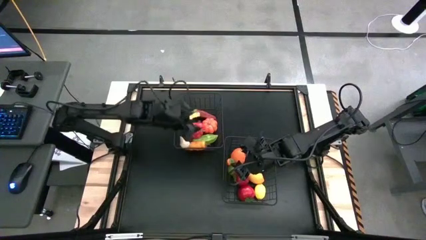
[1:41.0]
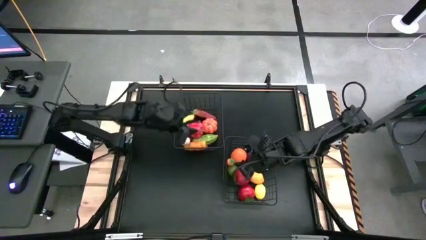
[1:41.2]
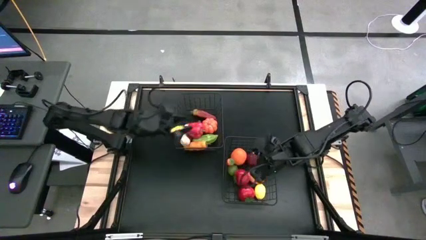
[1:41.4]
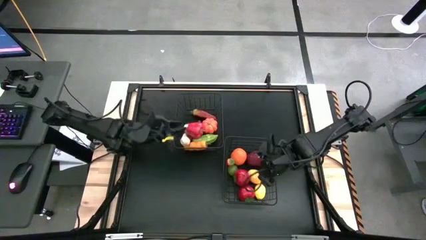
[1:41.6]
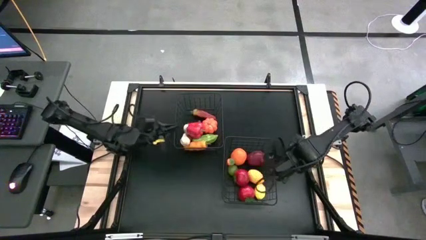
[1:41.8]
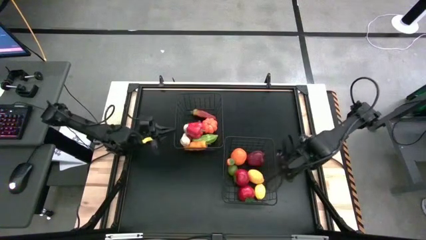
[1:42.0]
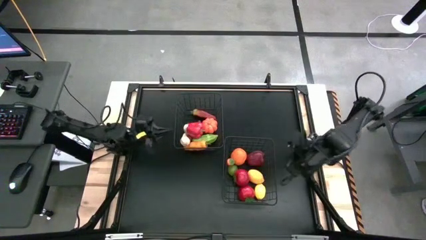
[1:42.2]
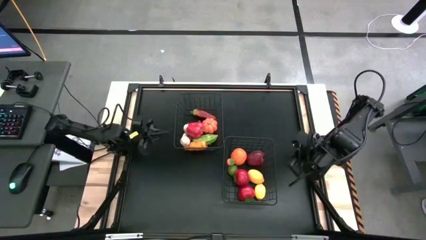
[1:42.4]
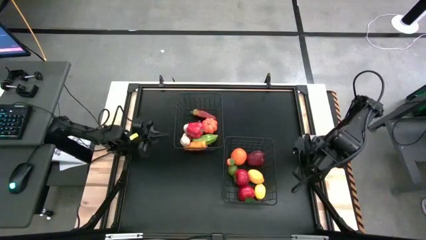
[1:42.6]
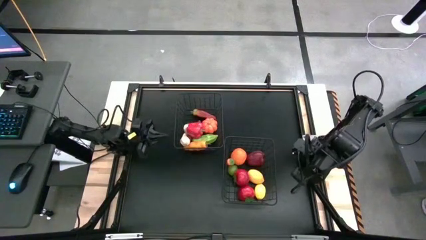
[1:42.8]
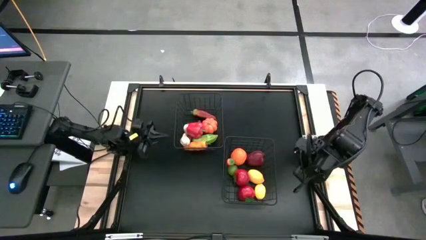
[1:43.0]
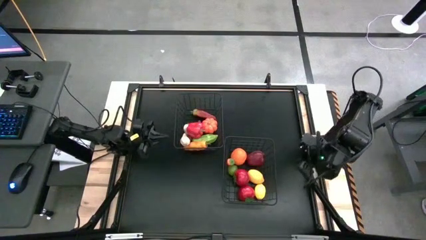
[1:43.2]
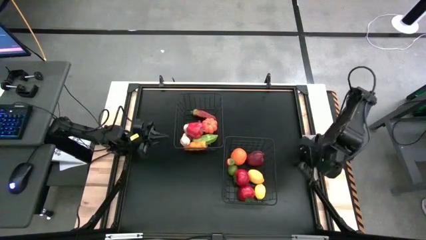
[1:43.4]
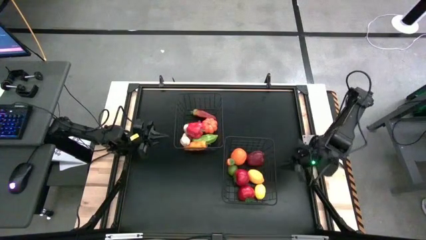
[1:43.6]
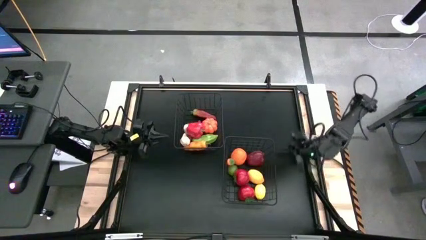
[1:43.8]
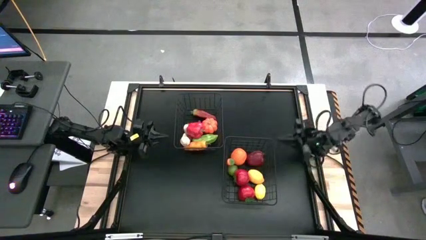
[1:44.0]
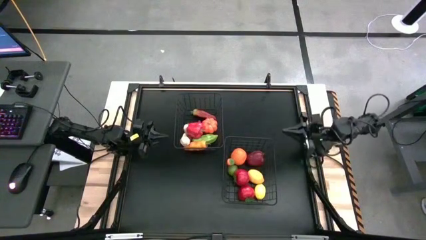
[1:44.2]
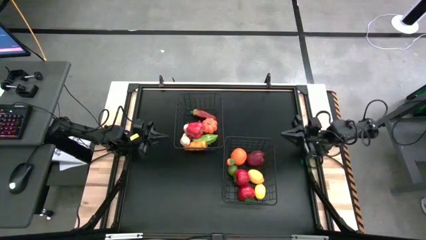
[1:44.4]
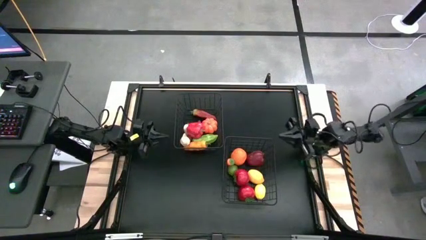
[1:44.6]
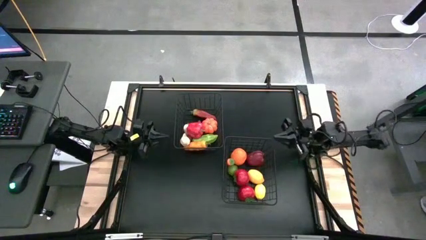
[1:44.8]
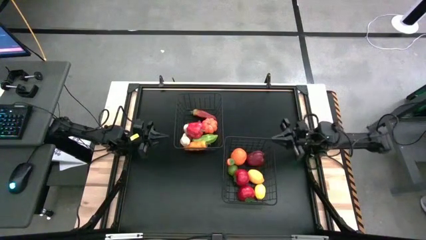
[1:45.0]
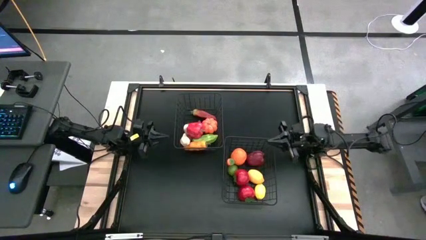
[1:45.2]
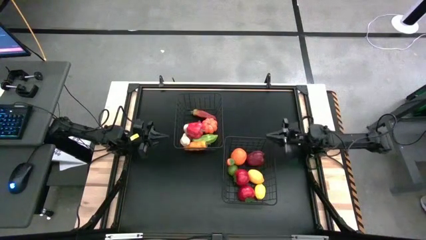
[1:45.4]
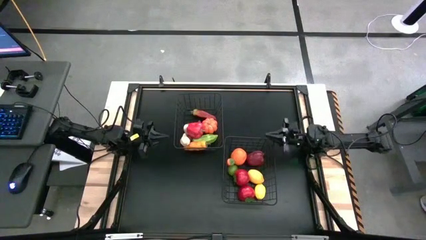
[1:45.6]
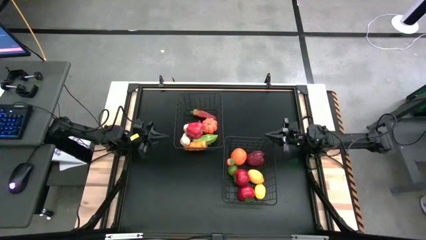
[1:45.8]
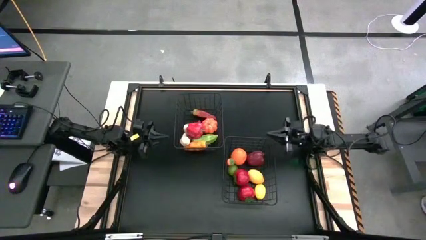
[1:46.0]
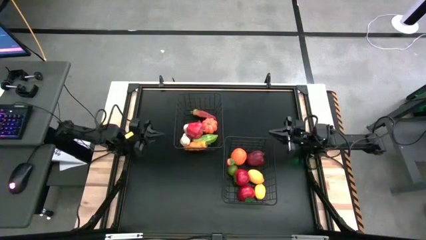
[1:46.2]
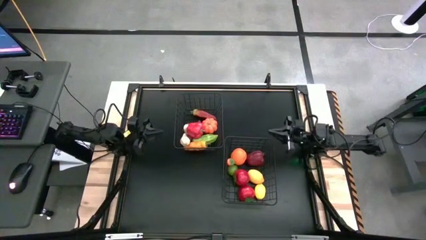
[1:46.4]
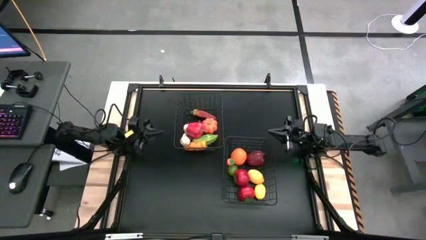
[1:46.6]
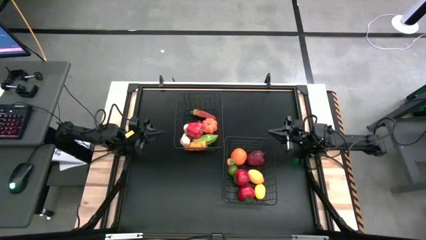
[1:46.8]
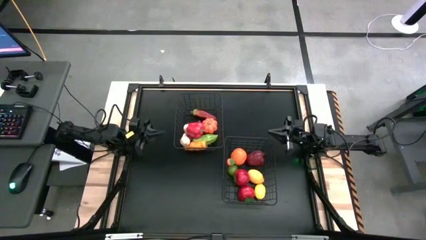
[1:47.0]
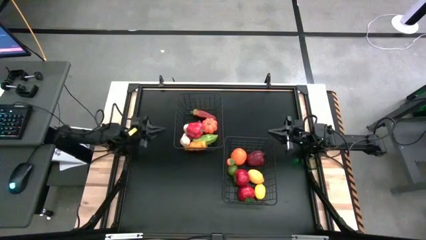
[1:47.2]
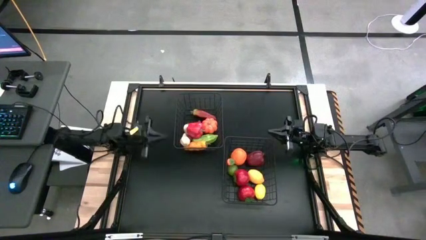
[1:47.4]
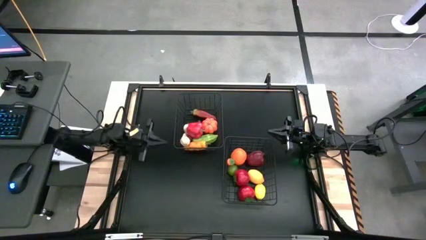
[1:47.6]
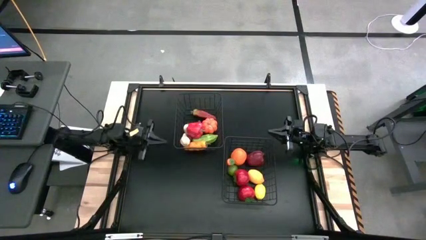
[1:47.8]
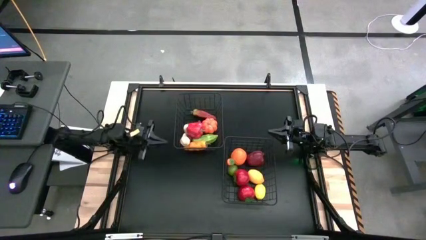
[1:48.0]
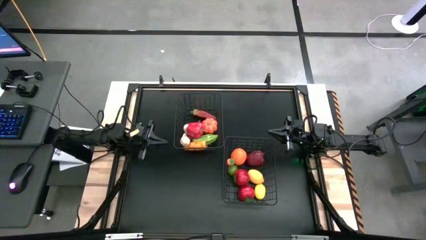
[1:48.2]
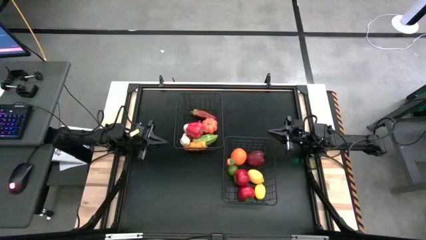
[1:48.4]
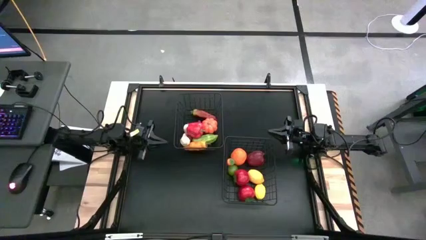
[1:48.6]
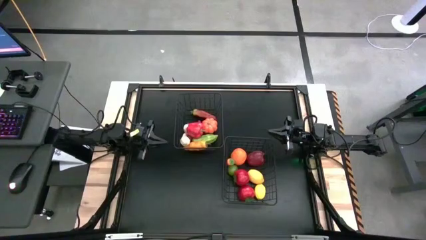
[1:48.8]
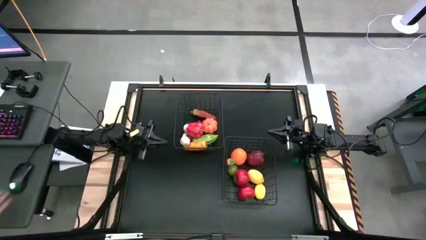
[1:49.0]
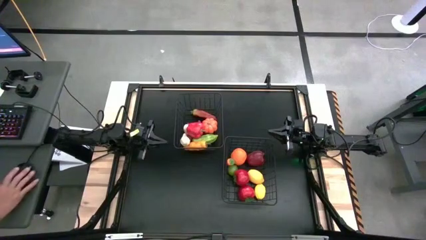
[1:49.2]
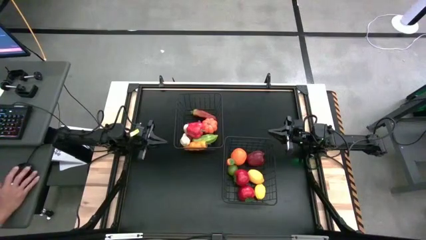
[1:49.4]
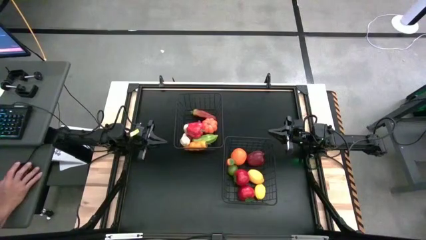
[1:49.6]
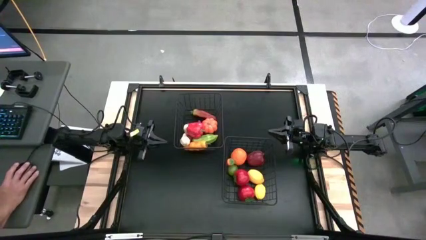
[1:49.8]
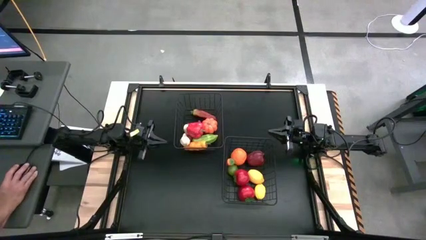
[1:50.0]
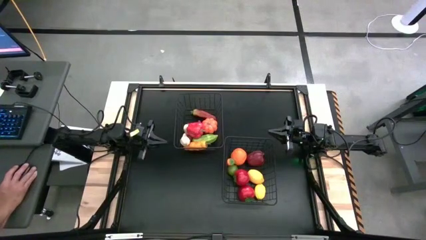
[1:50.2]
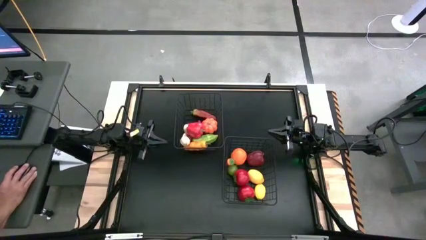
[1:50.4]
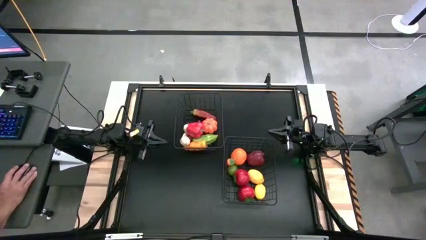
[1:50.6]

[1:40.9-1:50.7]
Task: Sort produce into baskets
Return to Home Position

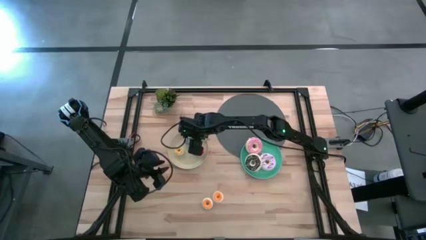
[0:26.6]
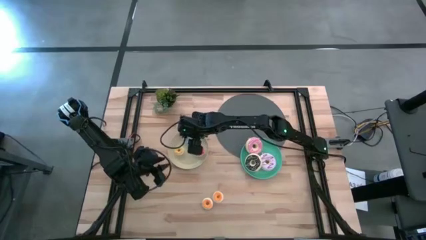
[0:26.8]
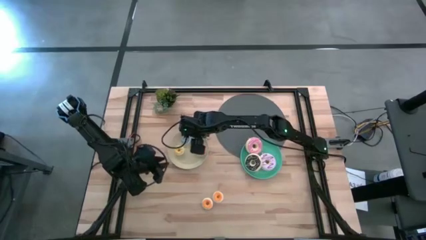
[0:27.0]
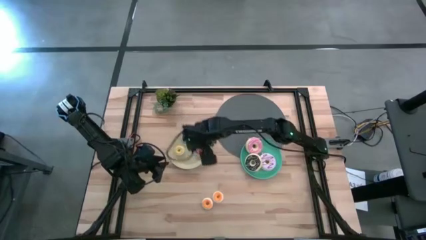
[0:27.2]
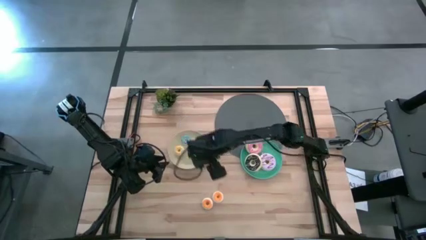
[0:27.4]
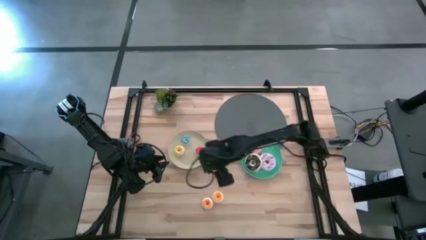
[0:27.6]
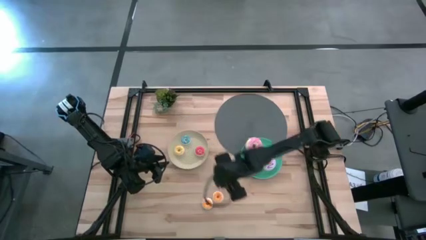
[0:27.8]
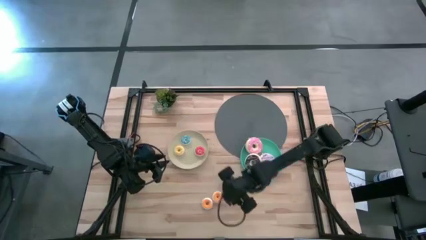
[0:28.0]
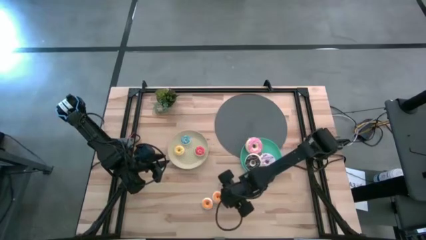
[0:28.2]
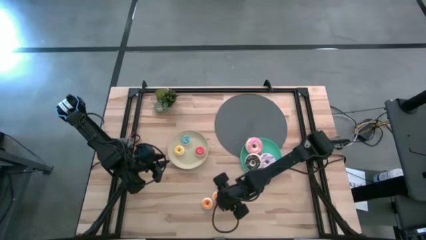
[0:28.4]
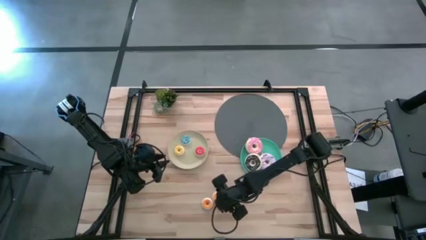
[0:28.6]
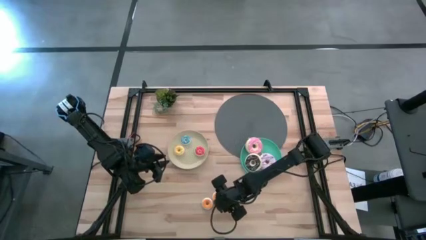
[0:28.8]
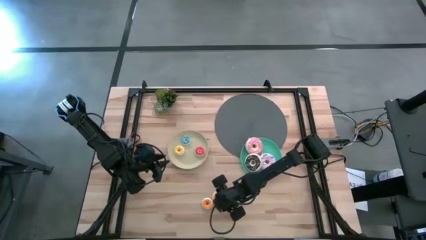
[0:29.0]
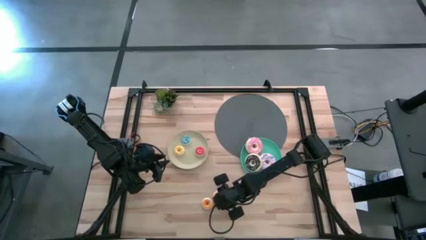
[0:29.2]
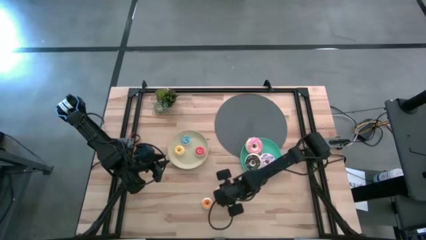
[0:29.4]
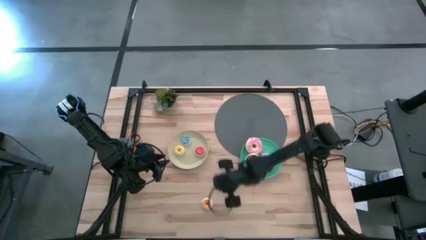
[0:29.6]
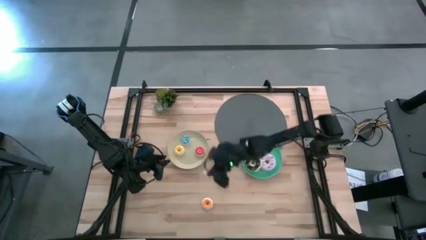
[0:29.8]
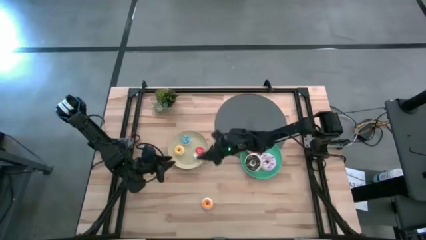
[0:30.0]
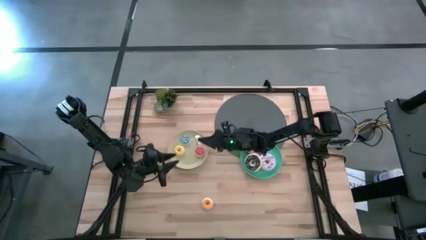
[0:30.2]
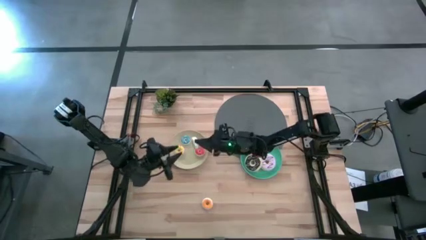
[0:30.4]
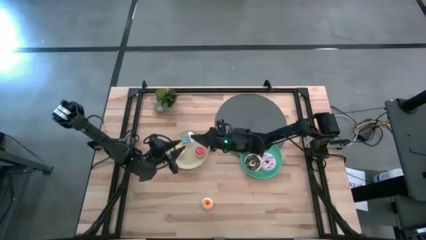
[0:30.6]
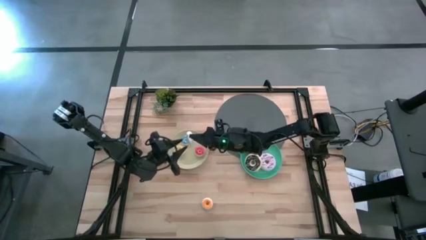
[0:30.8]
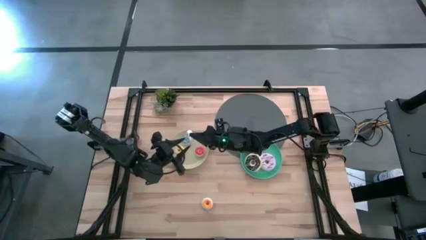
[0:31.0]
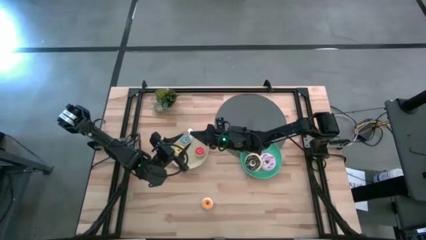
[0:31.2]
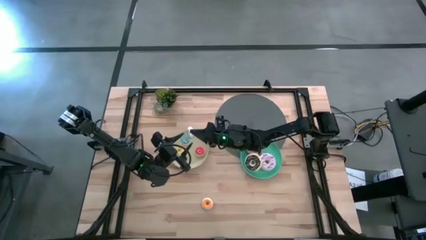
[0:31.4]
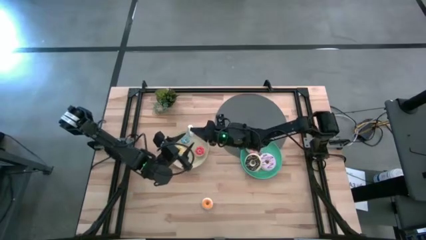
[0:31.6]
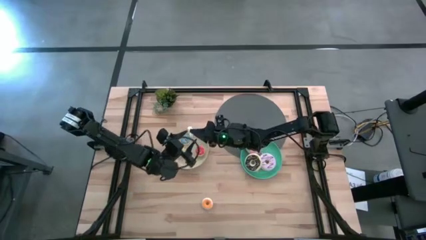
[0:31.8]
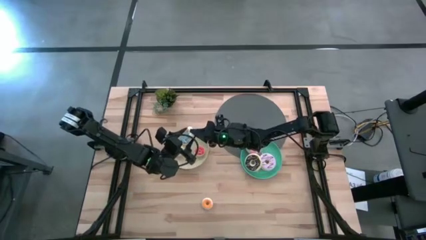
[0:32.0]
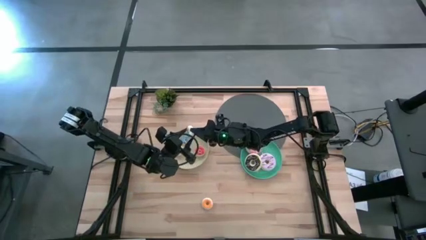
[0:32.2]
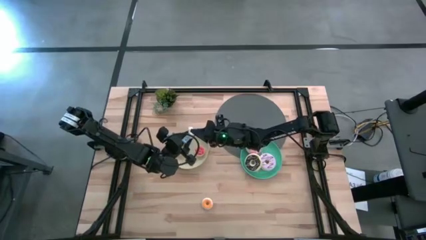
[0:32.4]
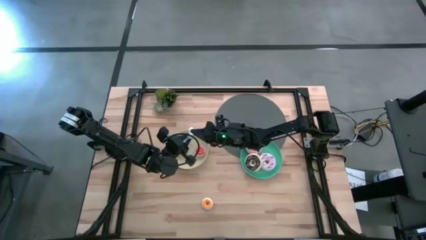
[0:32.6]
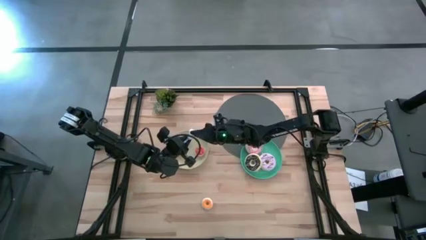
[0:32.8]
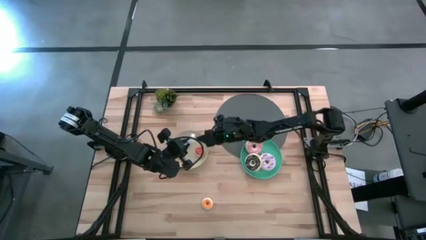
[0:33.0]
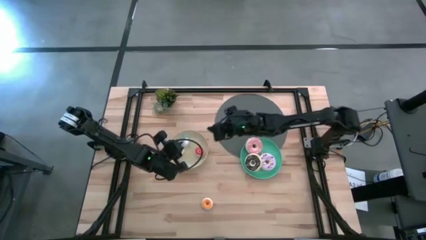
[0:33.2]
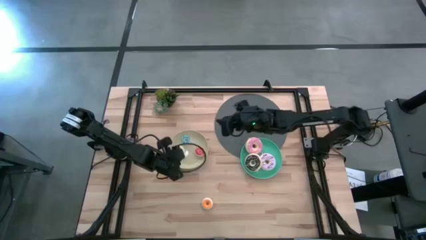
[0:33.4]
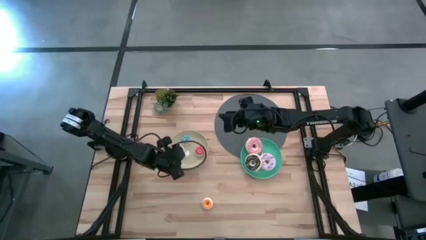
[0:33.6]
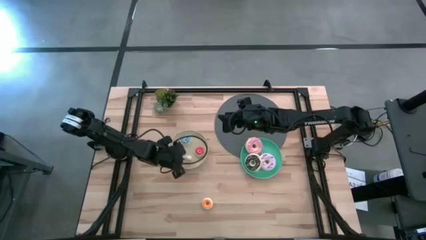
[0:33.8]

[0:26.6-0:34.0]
Task: Pick & Place donuts
Put the small white donut on the light brown plate
